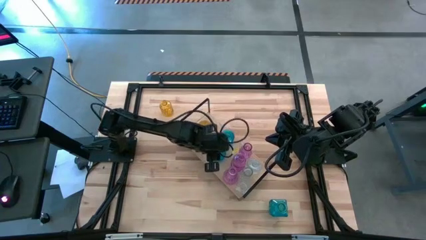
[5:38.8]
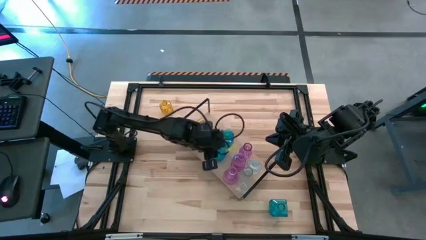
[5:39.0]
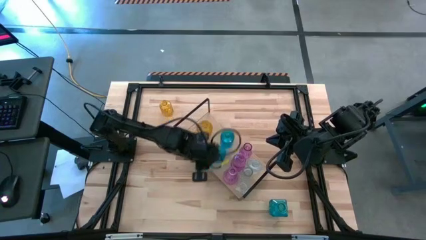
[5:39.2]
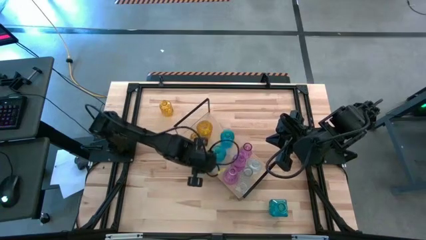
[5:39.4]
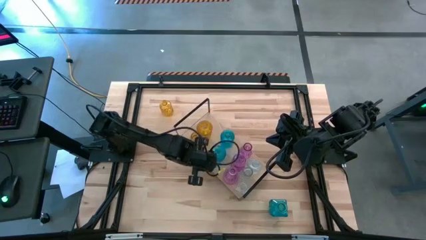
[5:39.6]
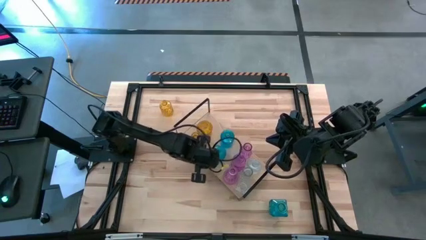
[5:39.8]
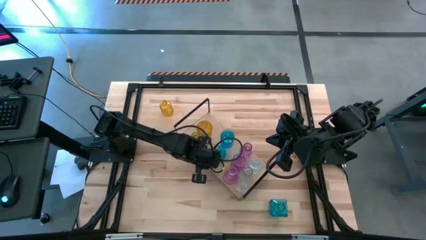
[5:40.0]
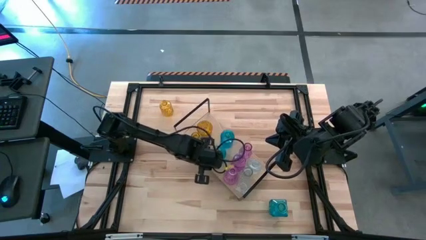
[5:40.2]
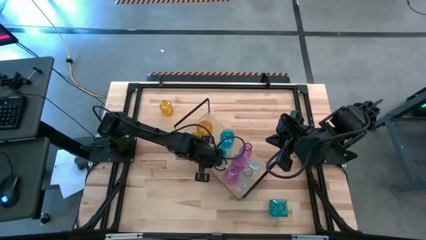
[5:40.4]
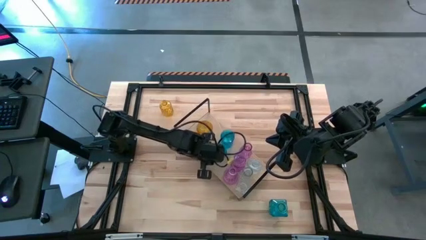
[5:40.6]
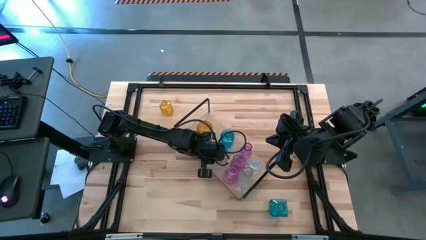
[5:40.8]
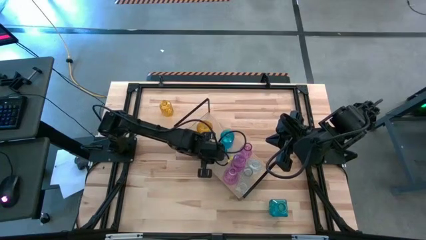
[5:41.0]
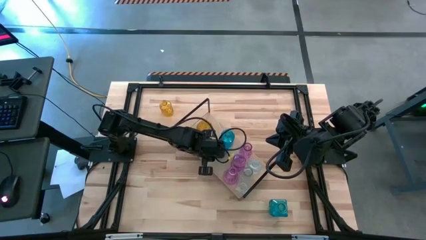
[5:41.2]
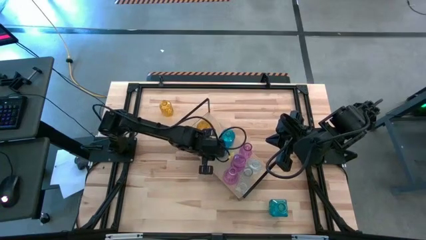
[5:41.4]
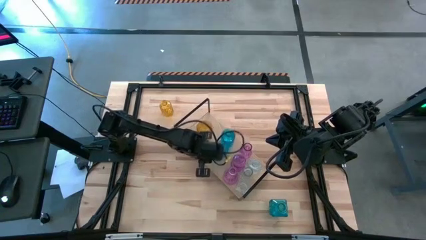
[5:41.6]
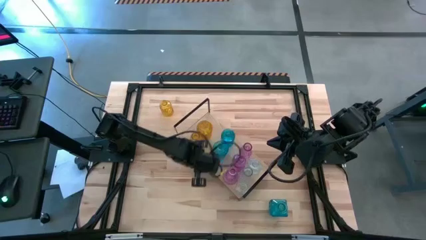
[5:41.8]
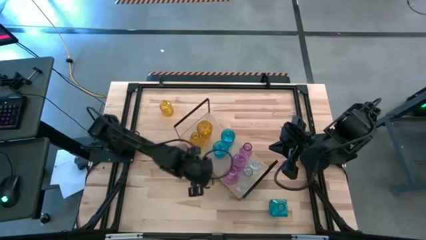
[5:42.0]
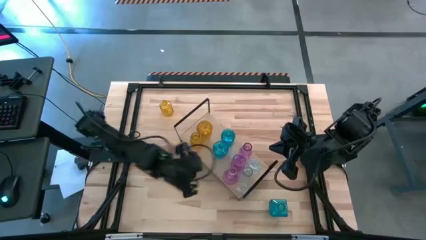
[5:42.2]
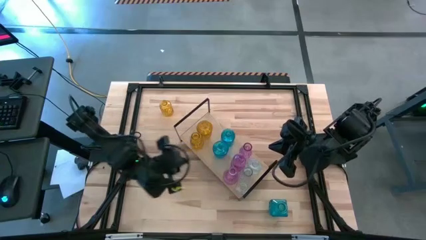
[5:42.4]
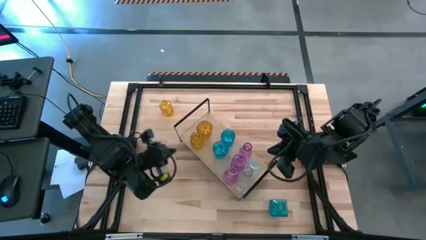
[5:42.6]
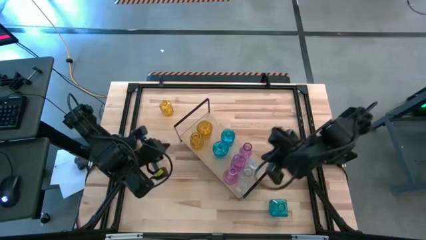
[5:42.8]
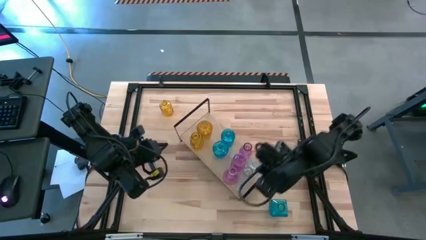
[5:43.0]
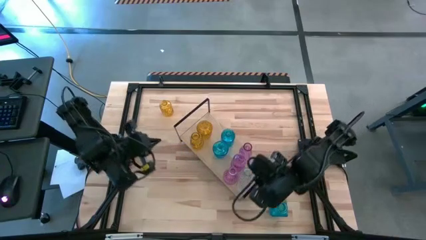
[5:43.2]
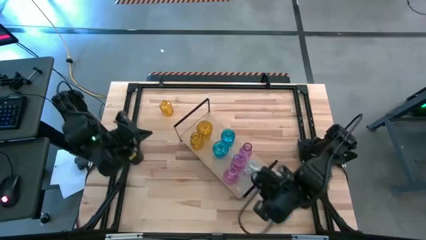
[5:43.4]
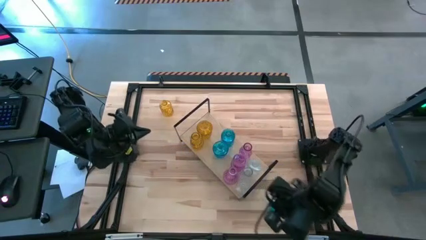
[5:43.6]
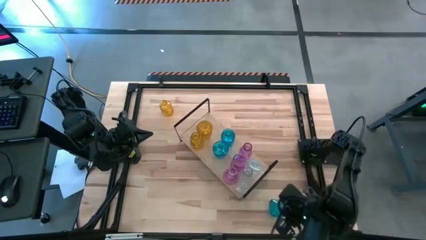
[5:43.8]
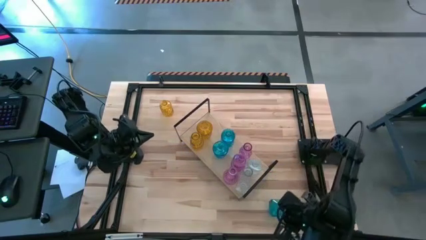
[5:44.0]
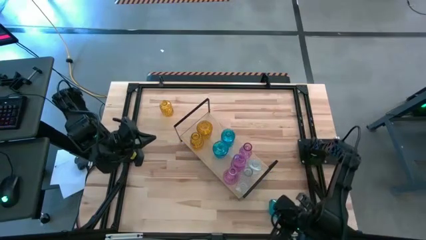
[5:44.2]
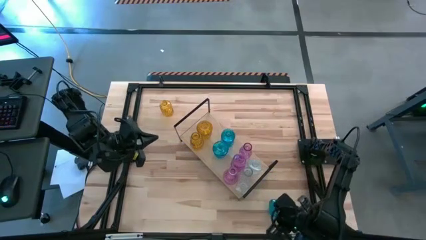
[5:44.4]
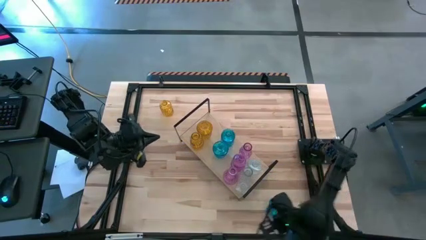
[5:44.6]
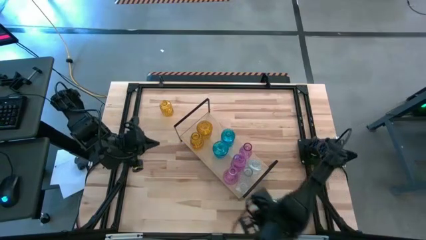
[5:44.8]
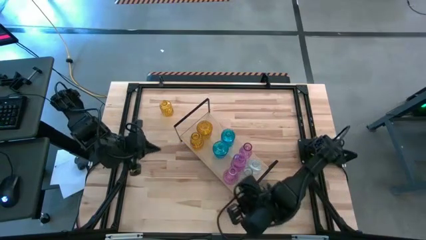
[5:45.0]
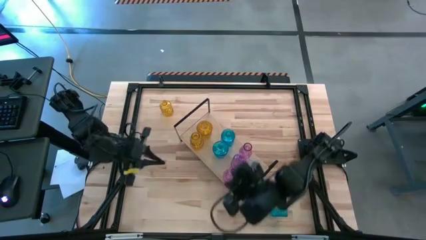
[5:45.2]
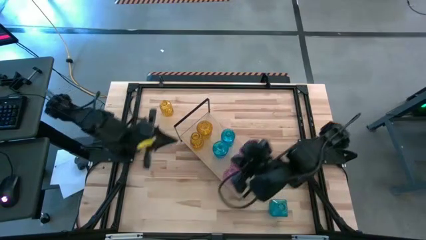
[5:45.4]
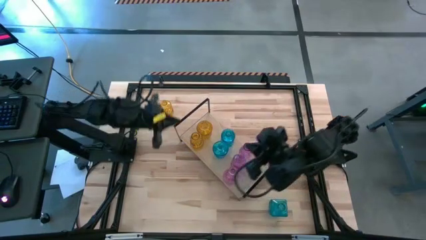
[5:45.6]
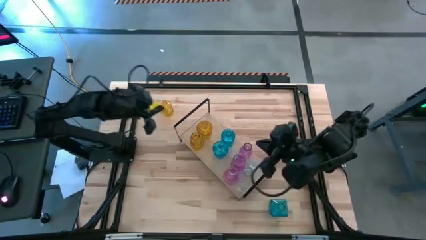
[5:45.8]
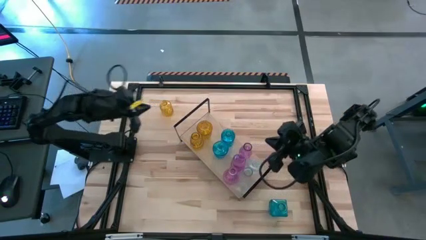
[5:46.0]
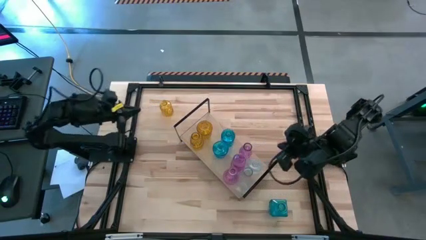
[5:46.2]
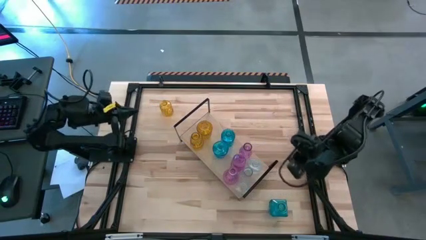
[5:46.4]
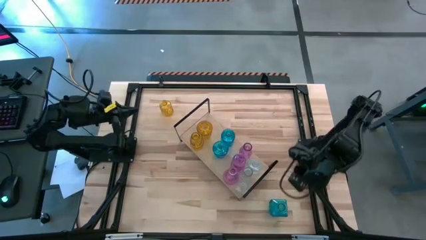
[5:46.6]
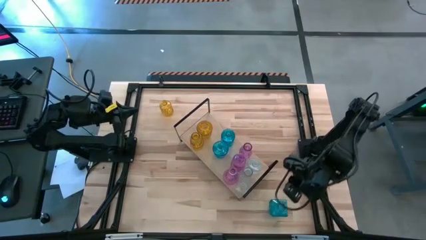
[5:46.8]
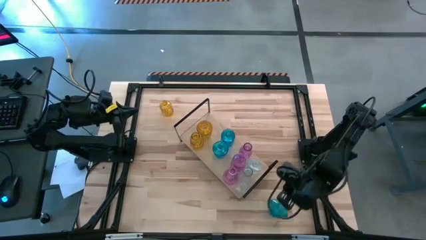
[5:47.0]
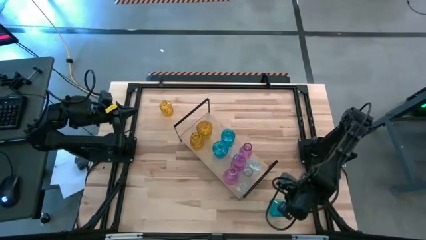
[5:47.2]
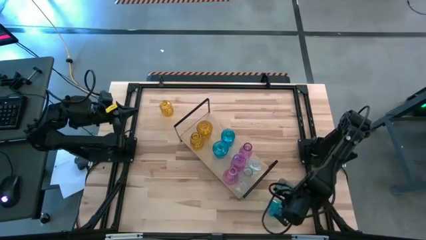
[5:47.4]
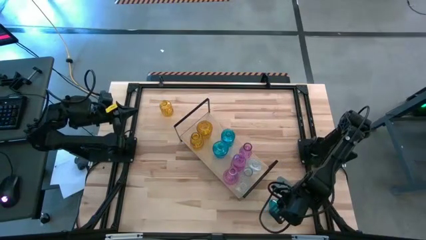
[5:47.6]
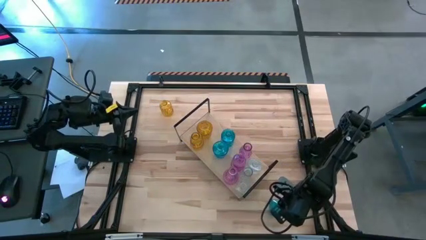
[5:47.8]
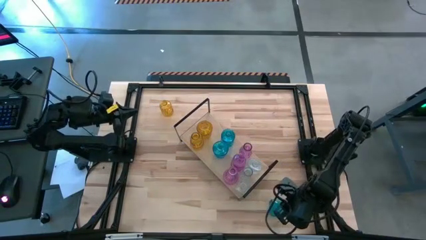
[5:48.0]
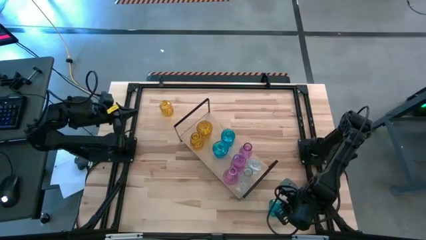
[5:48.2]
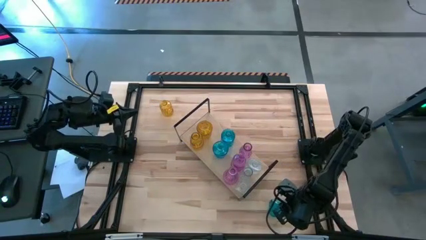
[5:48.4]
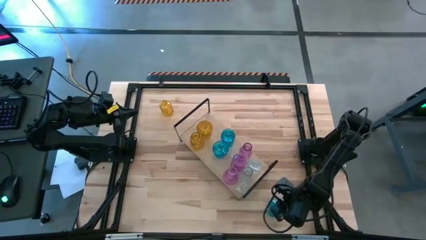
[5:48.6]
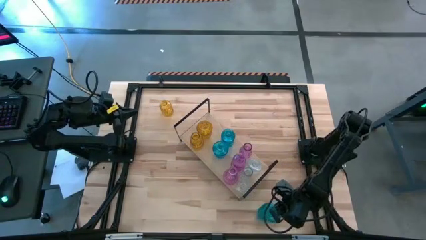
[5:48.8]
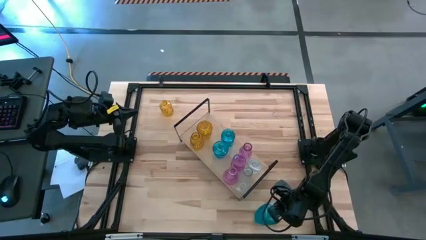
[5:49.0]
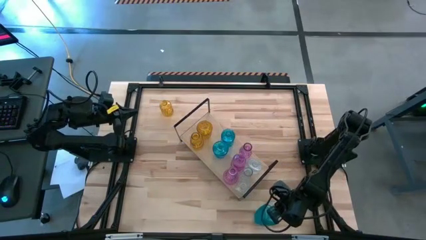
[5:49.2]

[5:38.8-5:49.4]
Task: sort vases onto shelf
Put the blue crystal vase on the shelf
